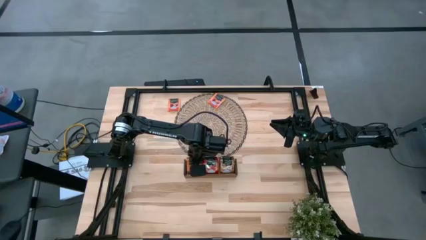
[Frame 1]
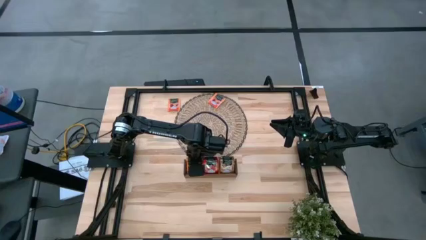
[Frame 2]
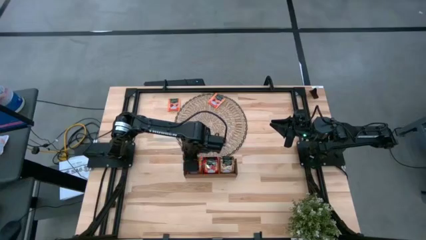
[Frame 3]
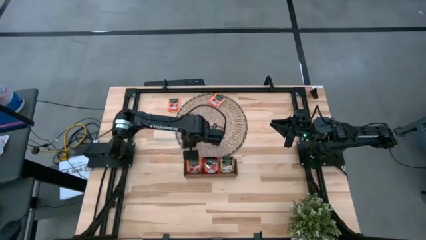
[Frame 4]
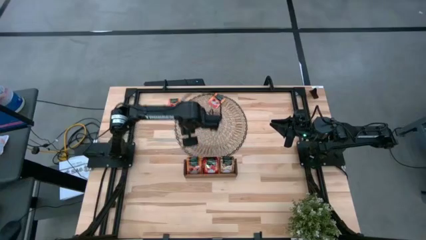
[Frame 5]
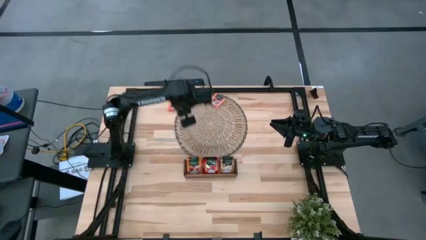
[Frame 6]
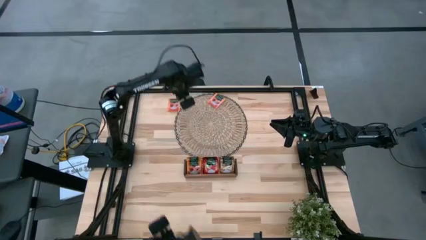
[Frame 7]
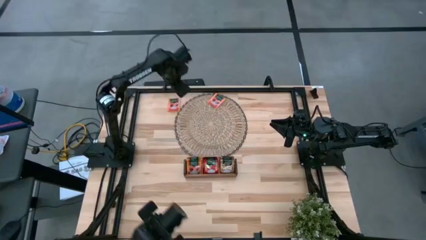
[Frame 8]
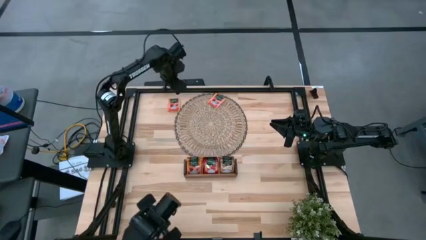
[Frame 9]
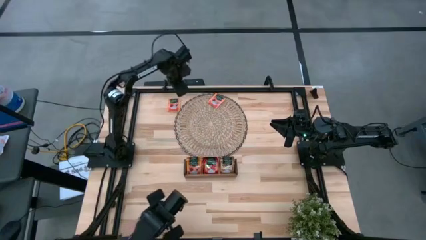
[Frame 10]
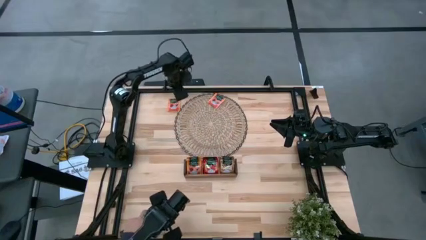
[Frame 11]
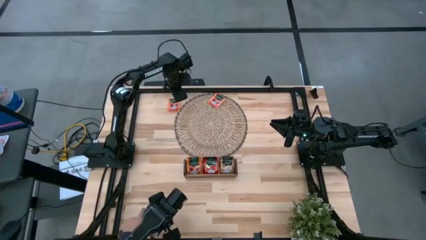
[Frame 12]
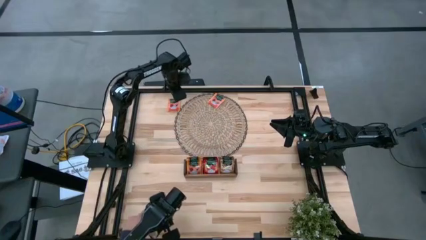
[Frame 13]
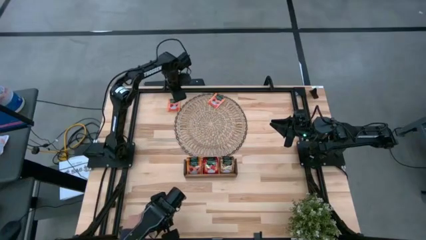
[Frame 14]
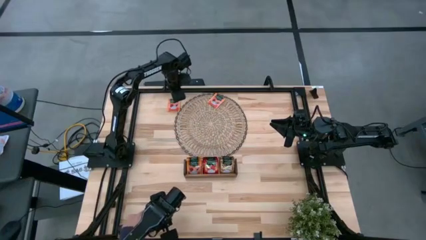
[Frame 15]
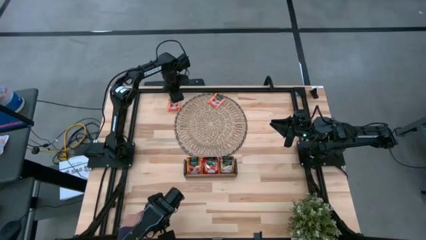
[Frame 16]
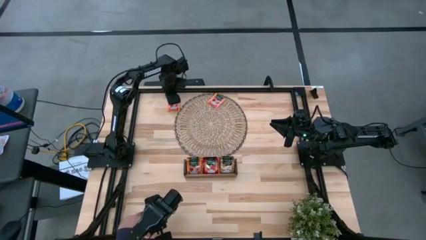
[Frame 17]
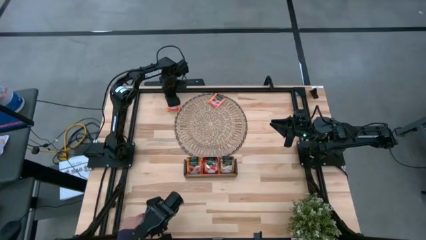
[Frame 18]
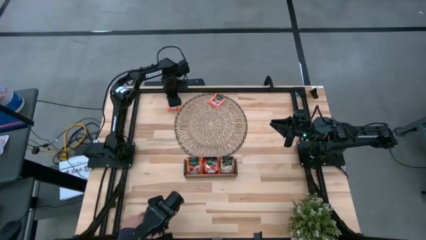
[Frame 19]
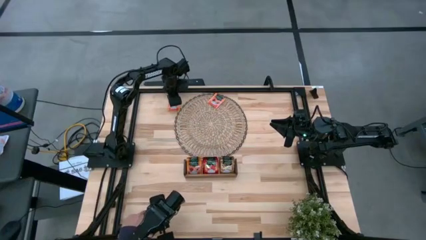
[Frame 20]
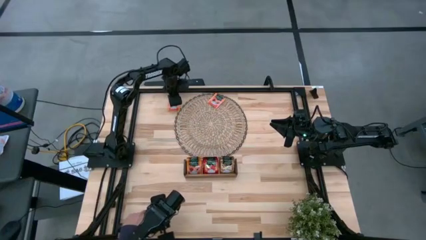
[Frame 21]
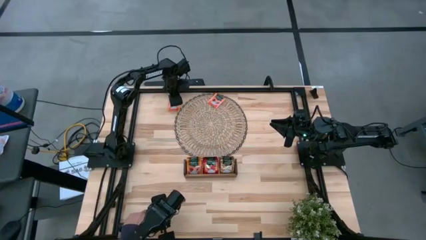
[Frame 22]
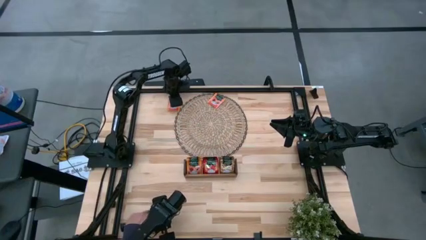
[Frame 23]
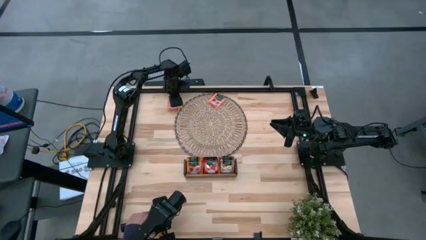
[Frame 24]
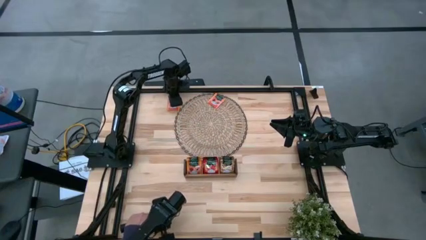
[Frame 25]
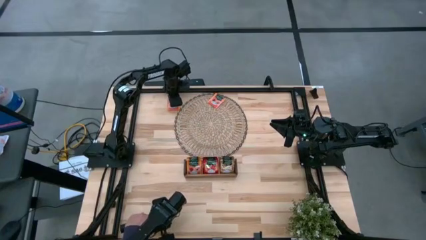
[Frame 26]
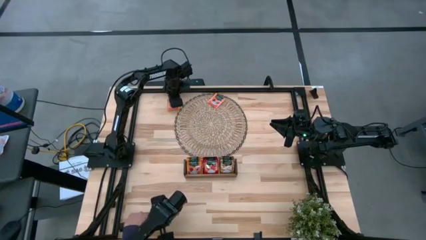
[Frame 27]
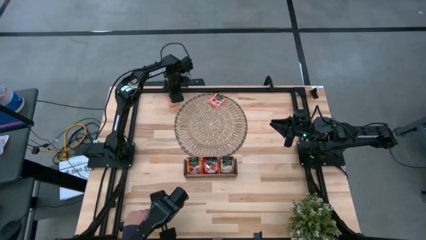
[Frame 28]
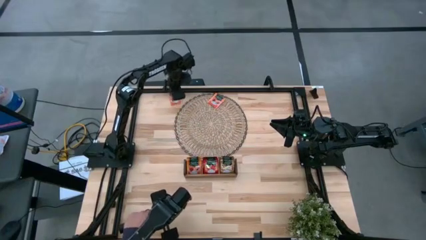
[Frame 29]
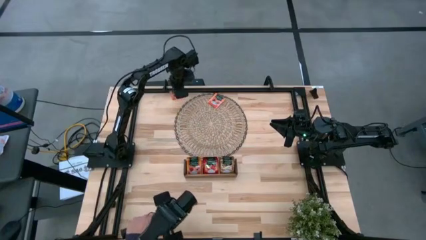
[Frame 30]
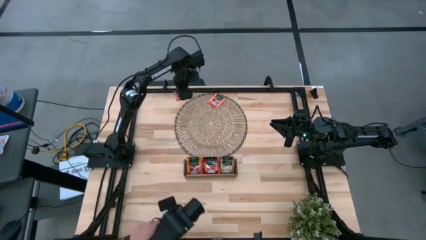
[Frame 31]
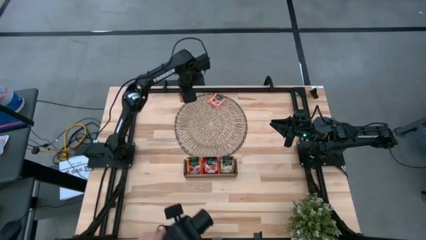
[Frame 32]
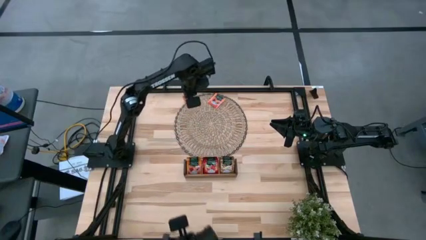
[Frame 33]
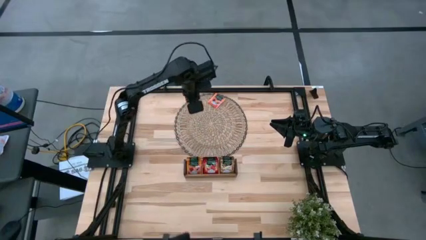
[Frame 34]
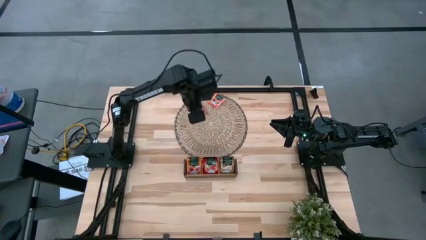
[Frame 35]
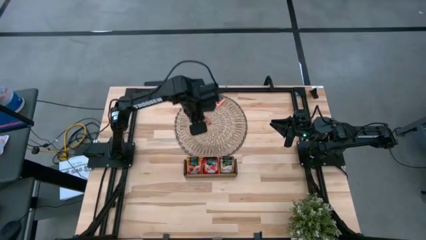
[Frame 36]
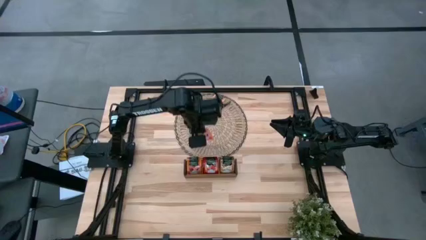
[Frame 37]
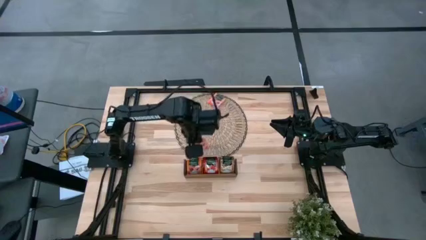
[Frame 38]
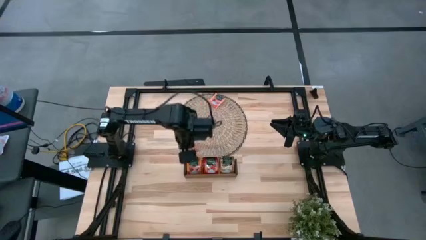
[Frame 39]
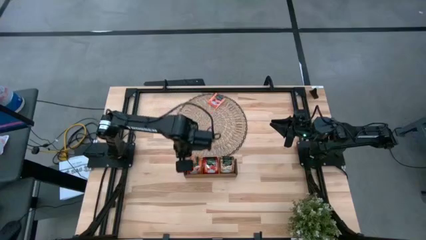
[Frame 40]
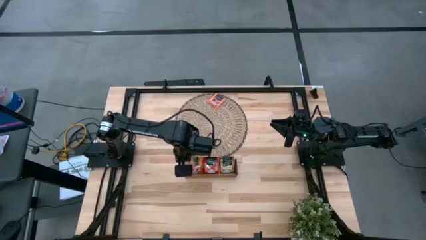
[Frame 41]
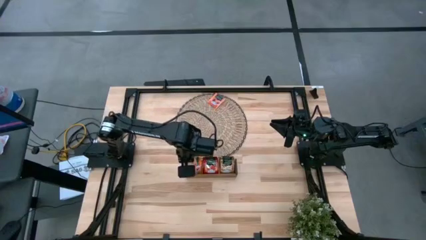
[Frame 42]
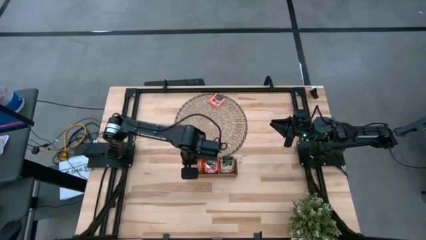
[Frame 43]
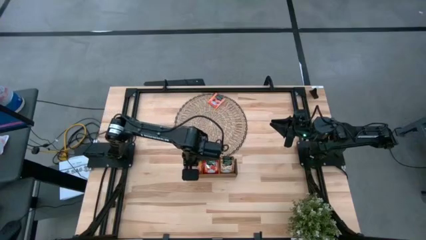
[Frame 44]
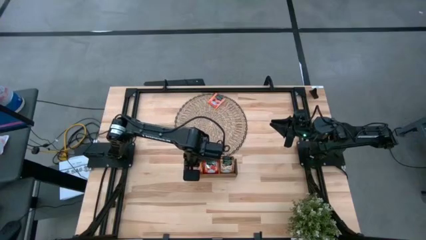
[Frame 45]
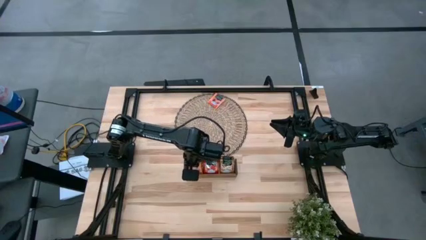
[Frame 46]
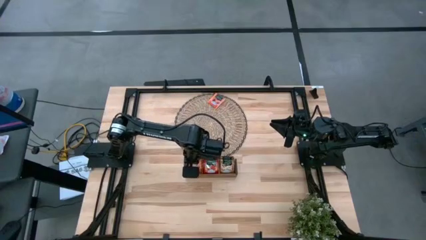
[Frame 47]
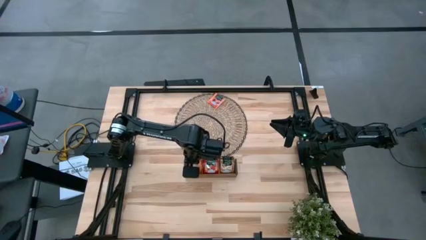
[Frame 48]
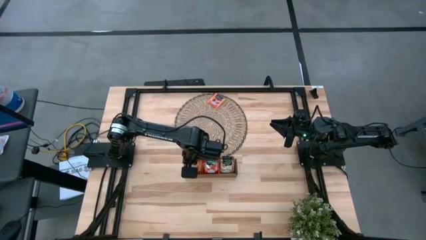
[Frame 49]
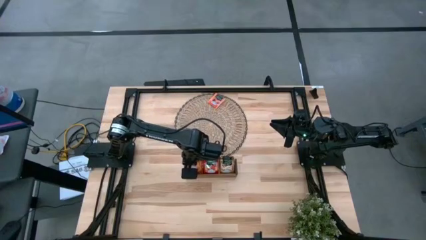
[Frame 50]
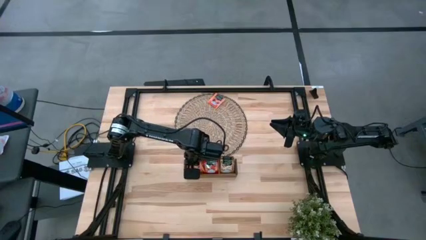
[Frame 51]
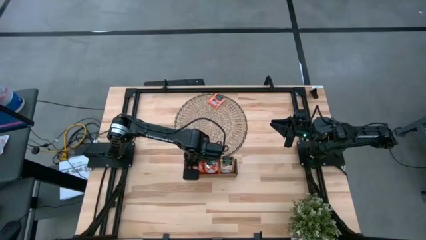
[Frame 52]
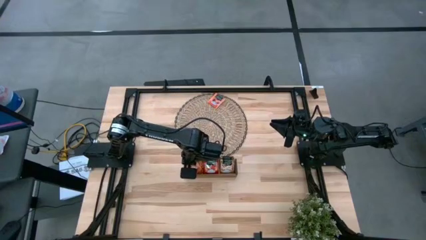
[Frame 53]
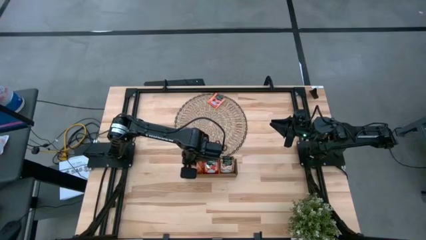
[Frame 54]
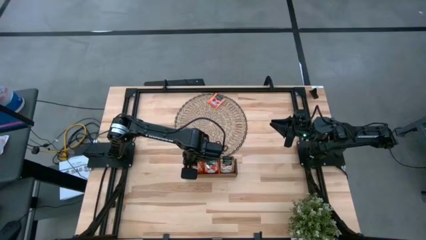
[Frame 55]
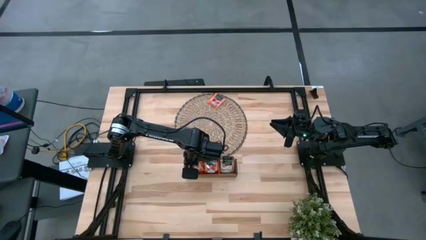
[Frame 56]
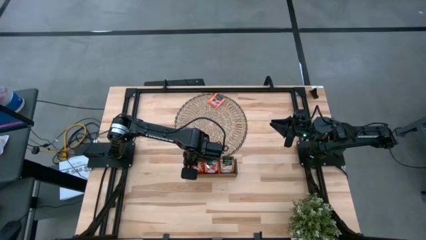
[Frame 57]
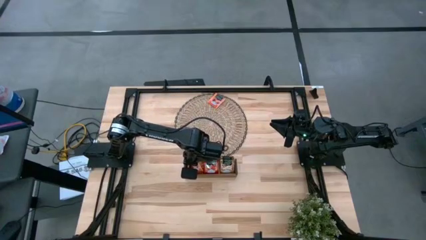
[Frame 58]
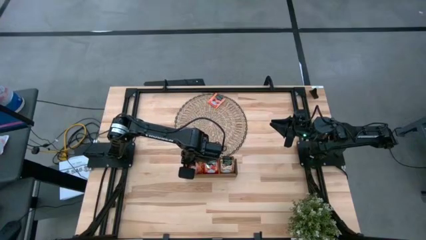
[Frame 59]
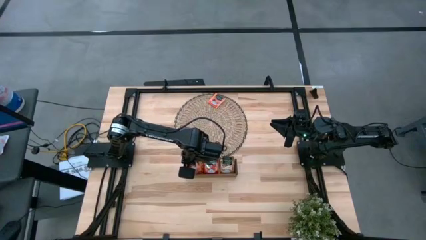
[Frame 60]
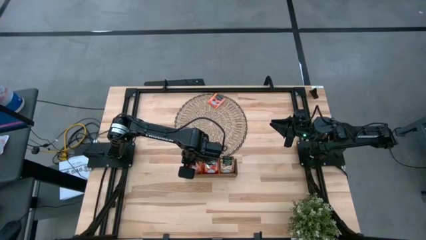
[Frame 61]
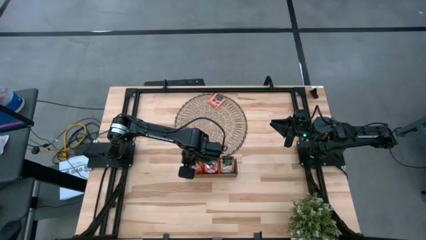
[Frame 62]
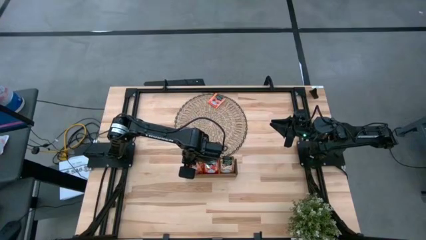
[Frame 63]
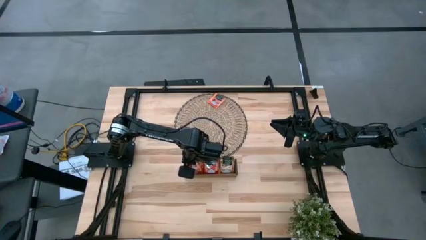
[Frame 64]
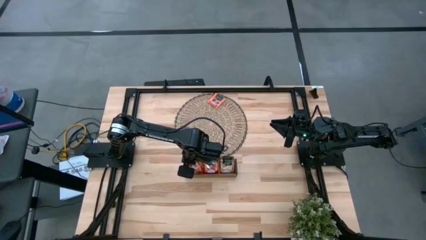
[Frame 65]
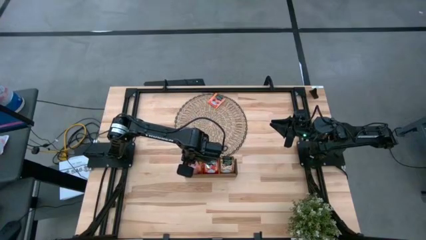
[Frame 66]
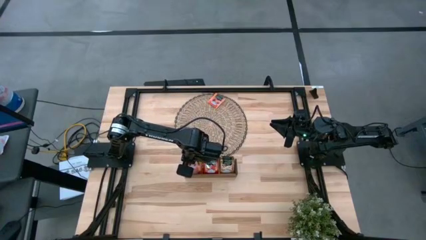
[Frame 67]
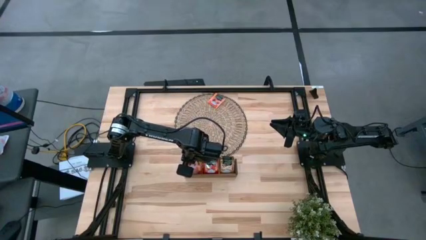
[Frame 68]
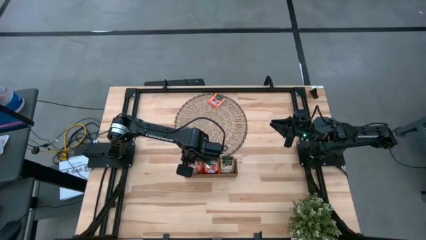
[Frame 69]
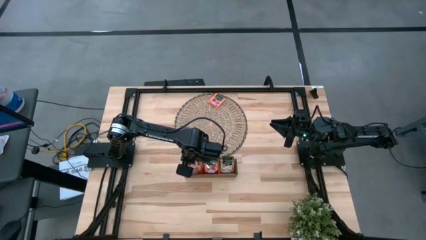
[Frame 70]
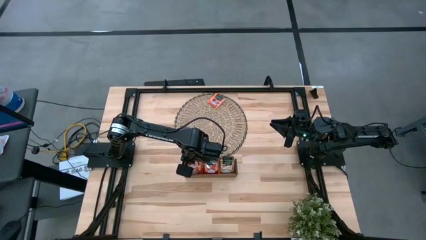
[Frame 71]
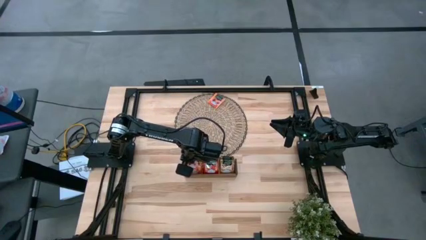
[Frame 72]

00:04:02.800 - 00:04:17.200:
Task: Pick & Place Tea
Put the orange tea bag into the left section of the wooden organizer
